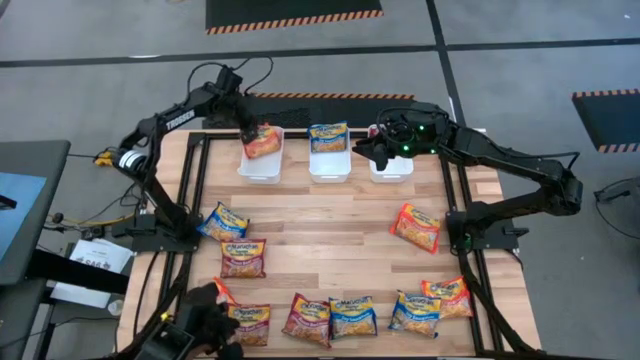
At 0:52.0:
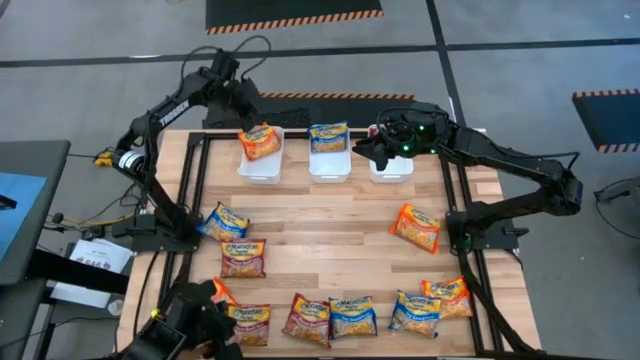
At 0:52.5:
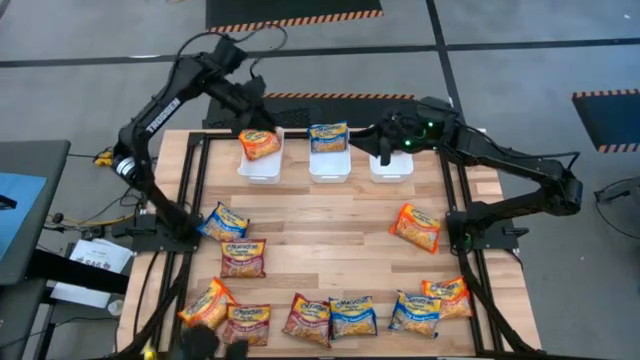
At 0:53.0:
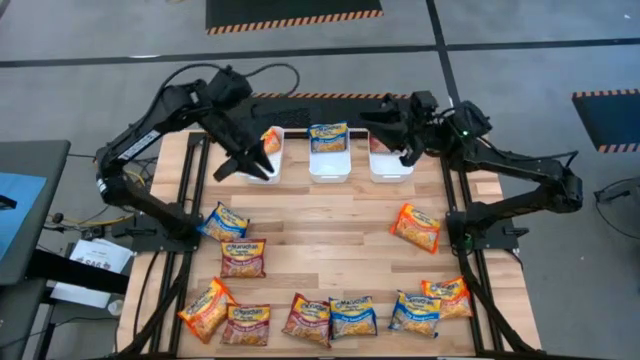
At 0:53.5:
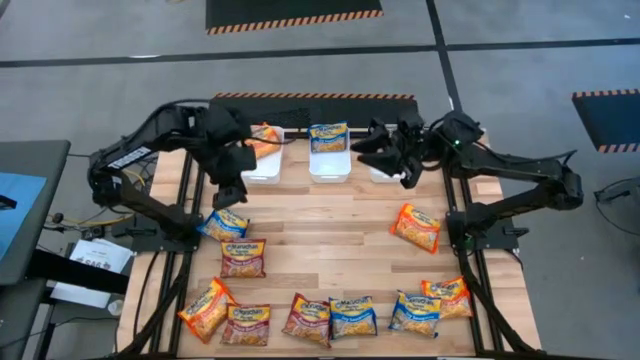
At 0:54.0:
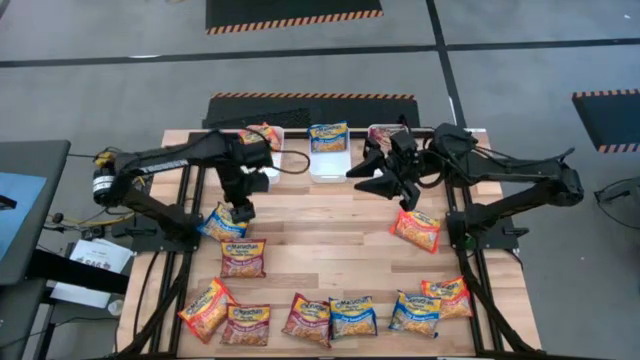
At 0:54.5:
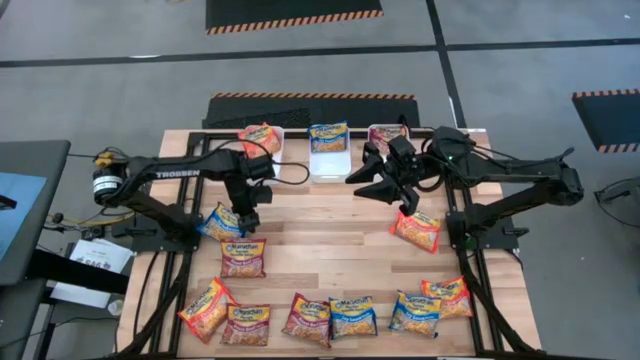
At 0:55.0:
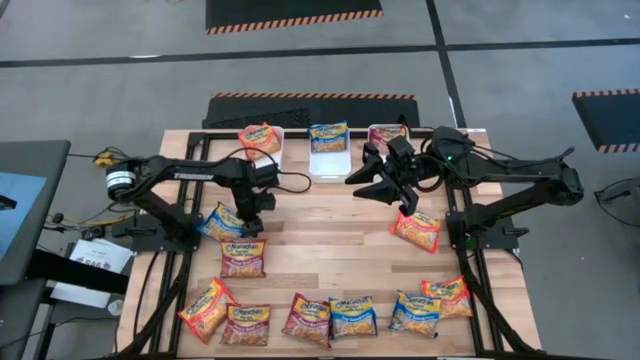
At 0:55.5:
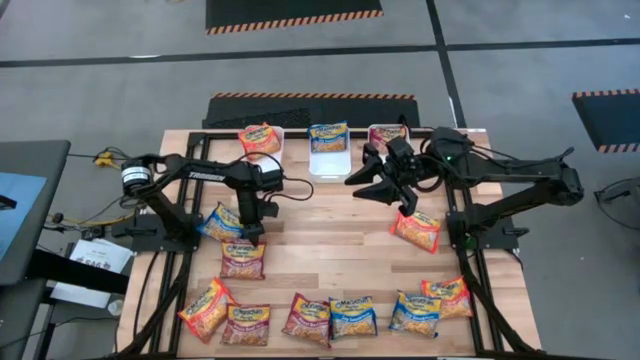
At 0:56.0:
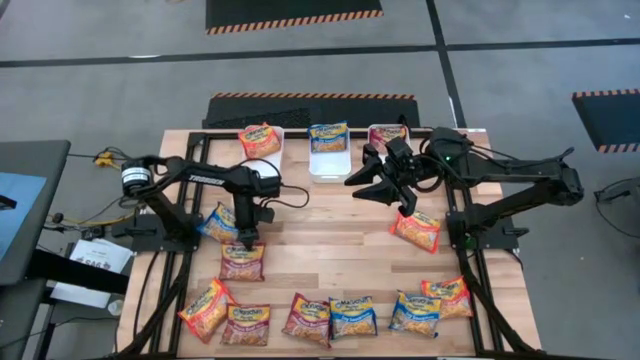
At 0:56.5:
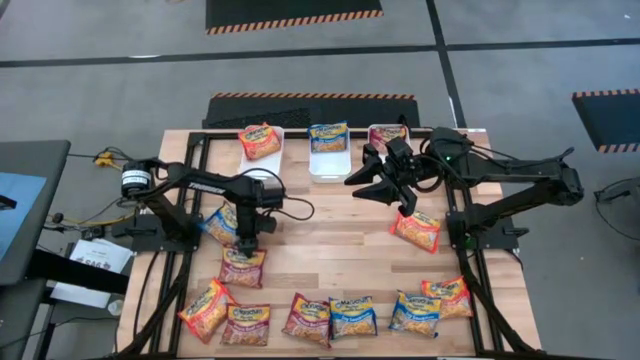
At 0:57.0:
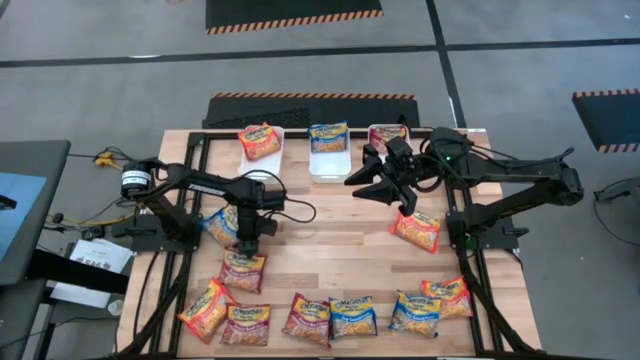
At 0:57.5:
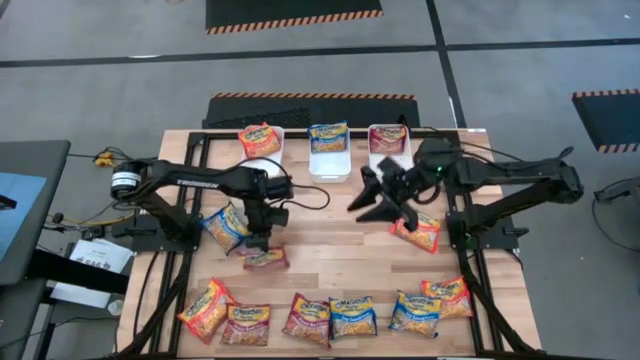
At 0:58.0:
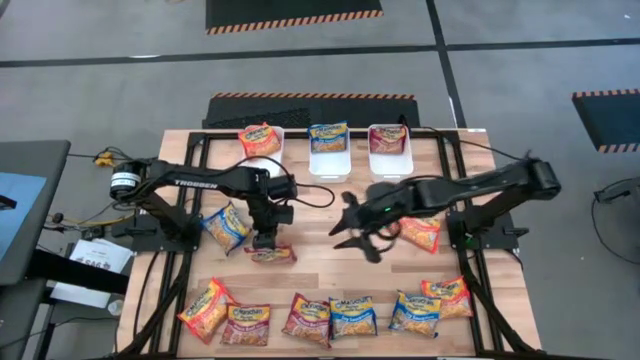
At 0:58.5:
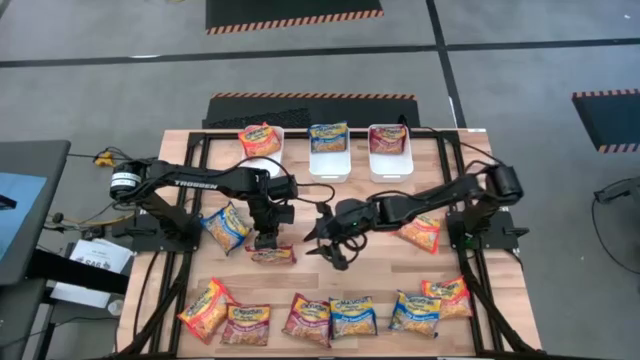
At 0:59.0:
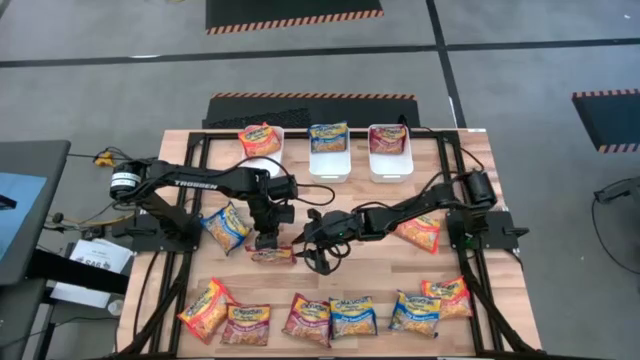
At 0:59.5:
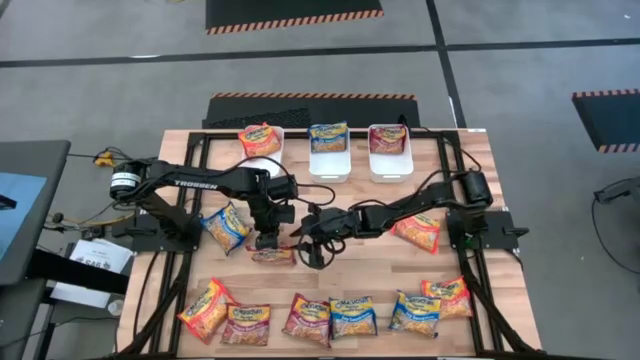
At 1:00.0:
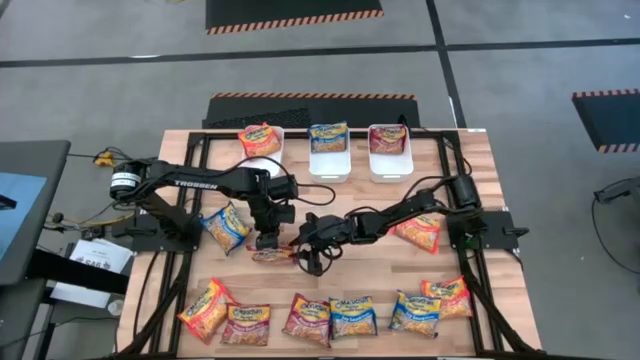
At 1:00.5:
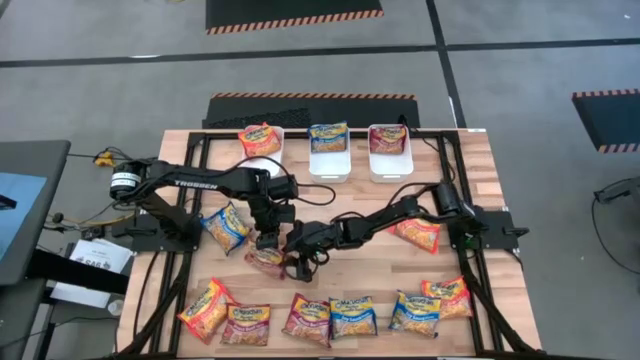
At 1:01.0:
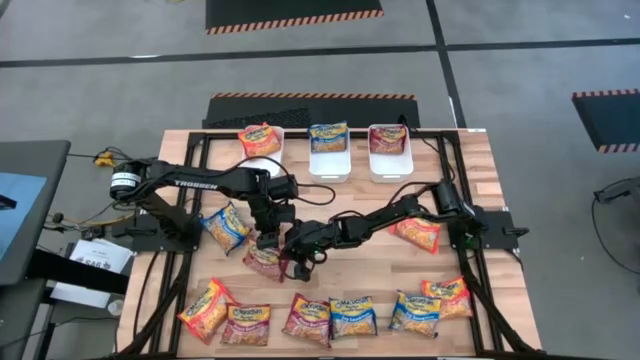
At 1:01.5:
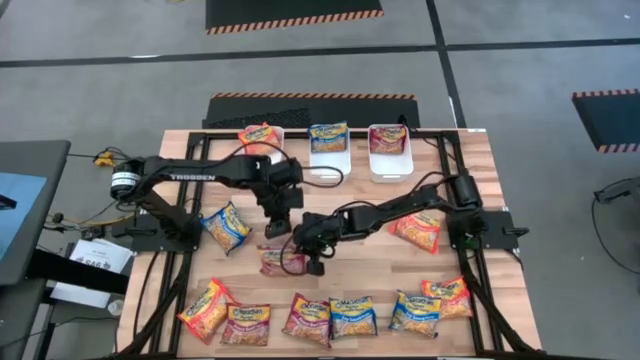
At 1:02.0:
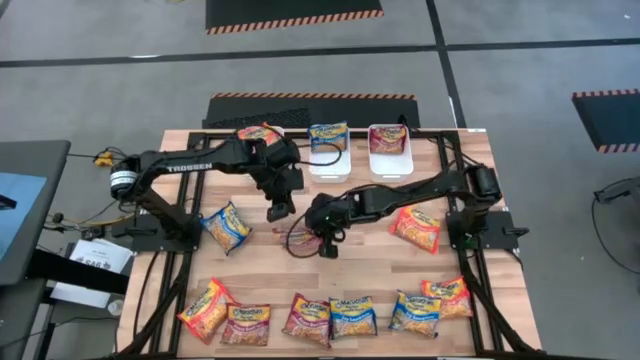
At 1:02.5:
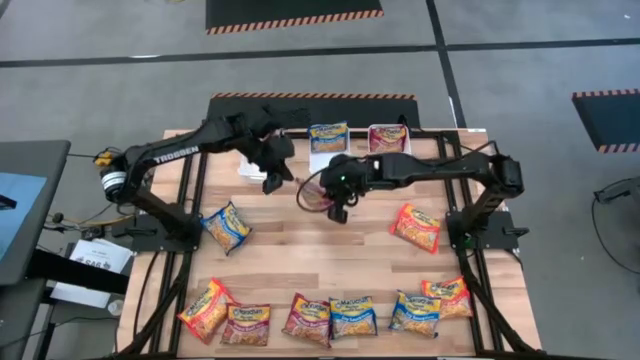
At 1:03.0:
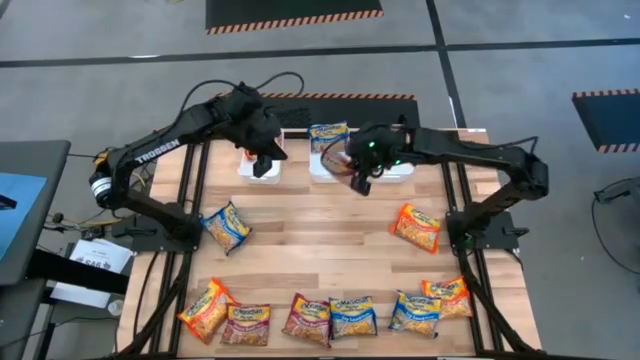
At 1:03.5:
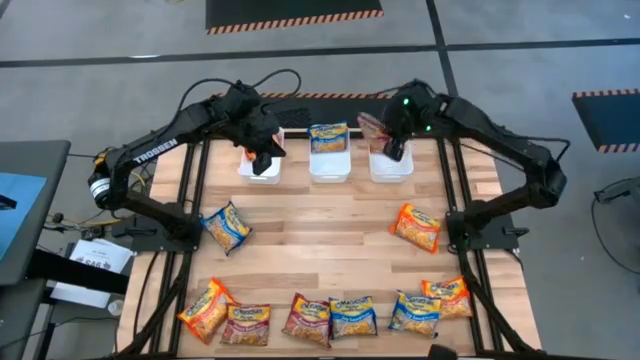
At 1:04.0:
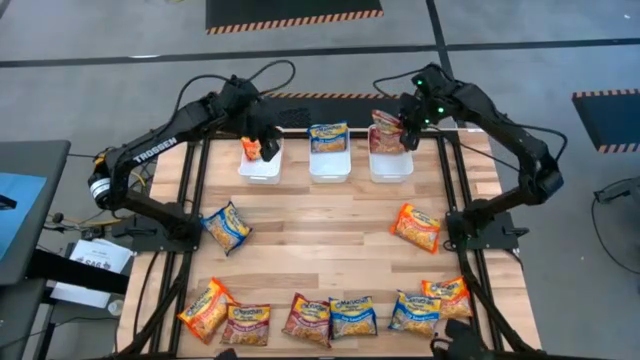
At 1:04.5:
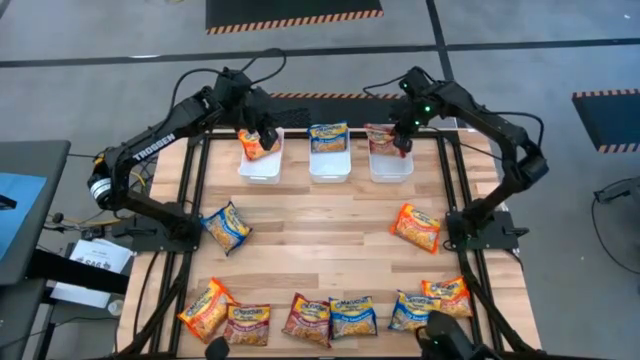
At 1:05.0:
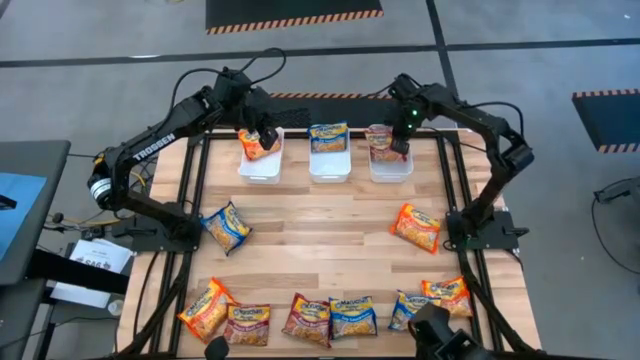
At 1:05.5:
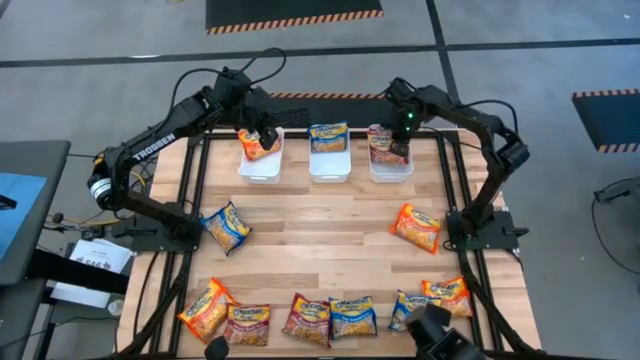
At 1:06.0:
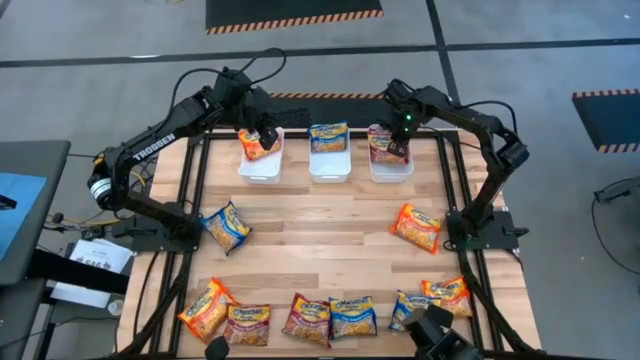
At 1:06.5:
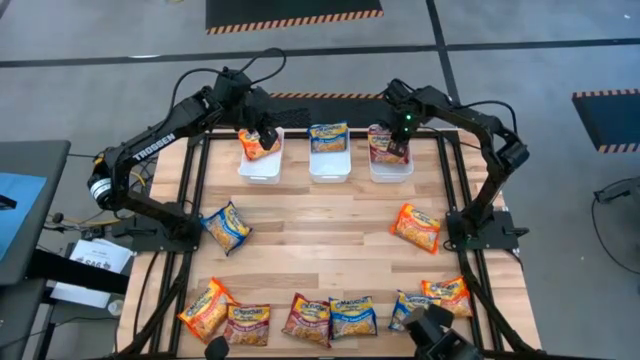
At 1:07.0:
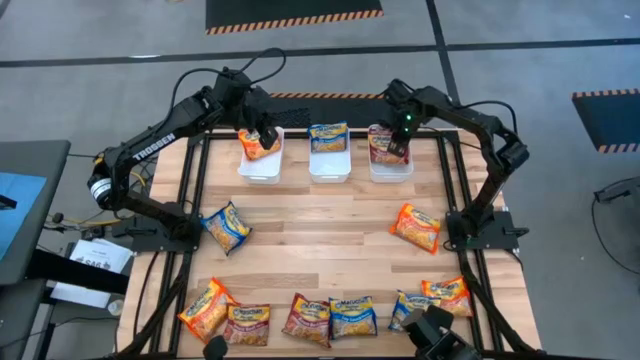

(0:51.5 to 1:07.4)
Task: Sort Maruchan noodles
Put the red noodle pack into the right white bin

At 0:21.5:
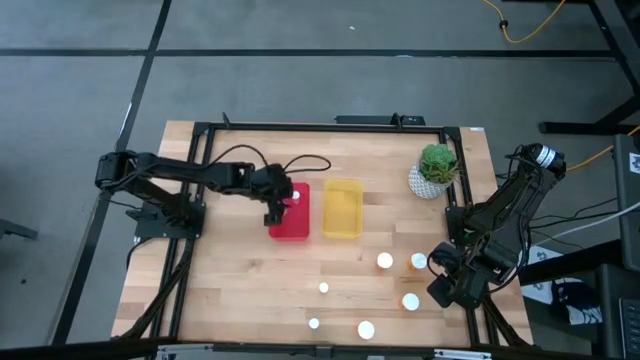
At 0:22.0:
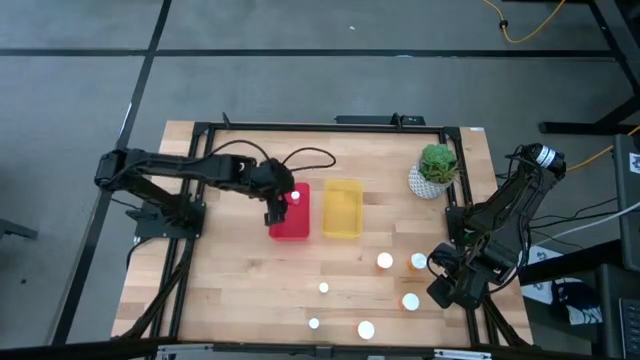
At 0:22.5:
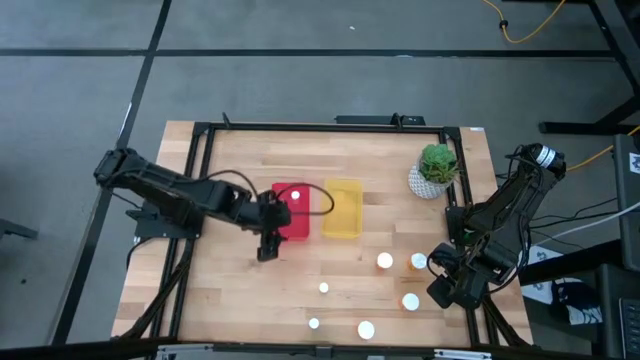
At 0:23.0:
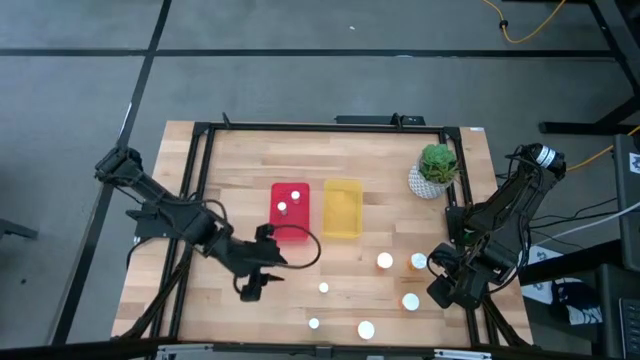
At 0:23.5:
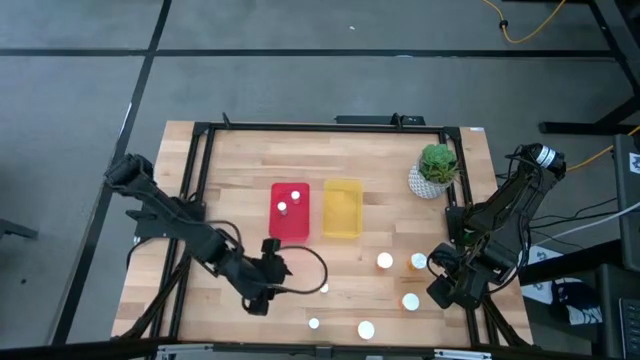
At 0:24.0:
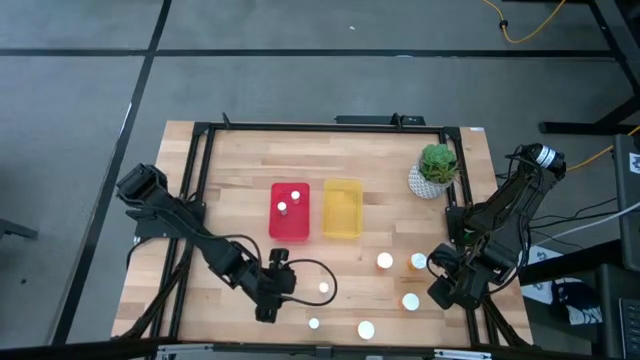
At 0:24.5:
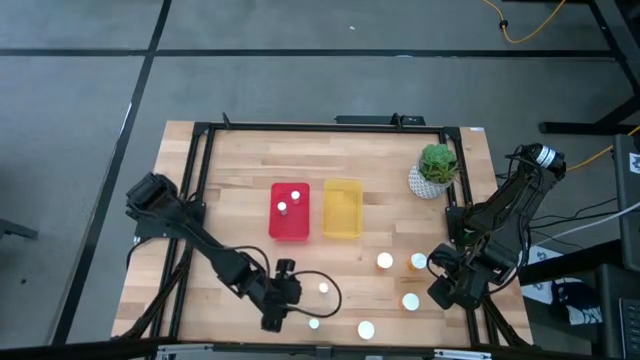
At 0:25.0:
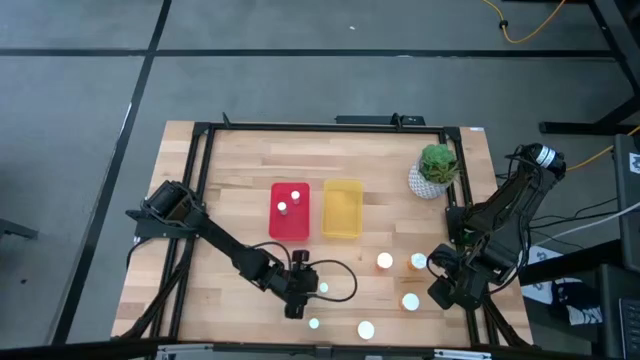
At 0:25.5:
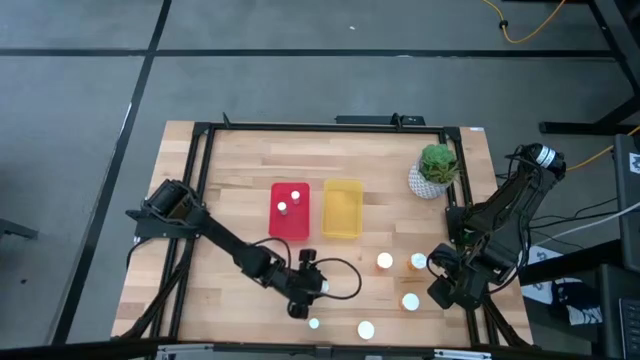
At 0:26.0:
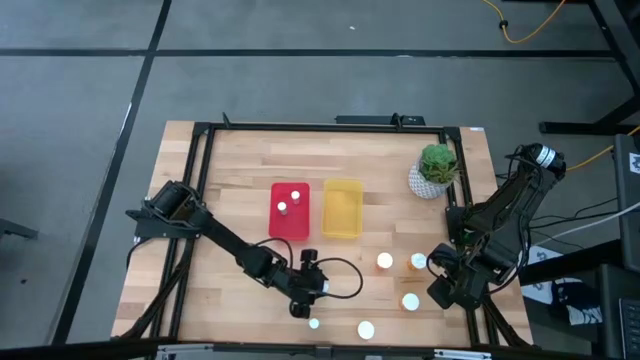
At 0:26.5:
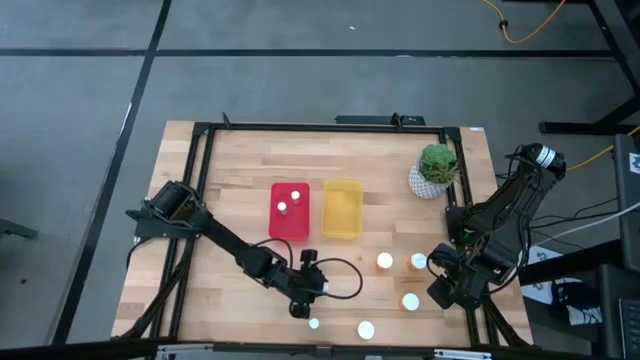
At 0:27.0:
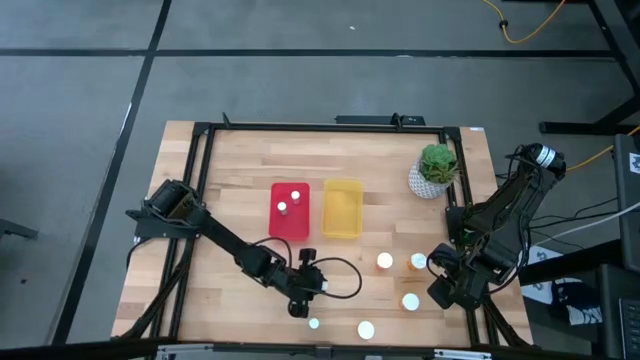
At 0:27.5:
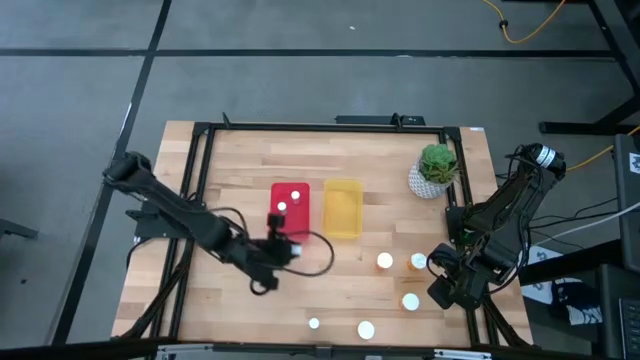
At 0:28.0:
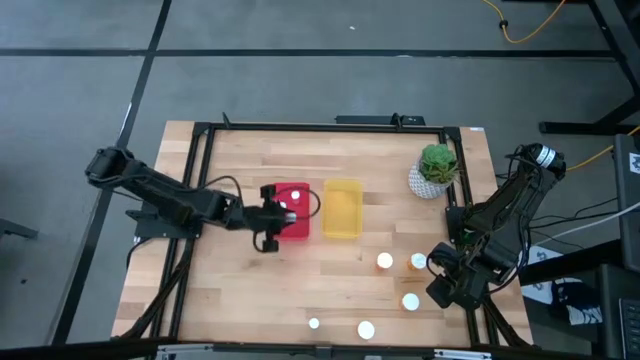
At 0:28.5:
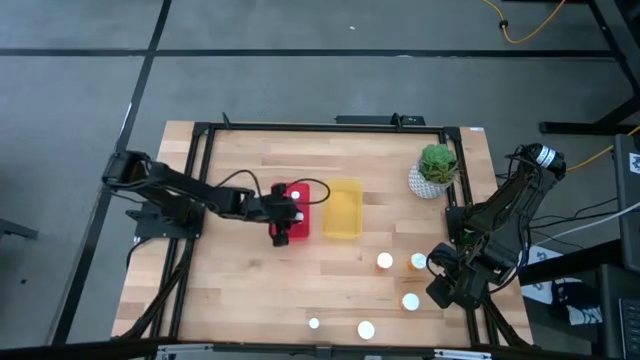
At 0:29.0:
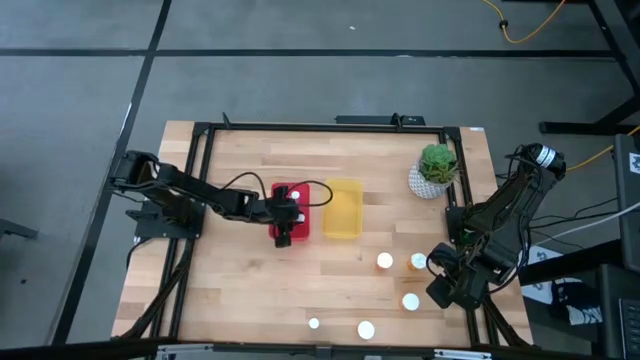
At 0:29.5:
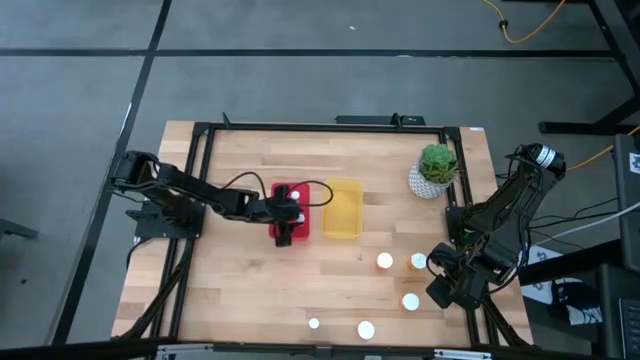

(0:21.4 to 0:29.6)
Task: Pick and place medicine bottles into bin by pill shape (circle, oval)
Put the small yellow pill bottle into the red bin
